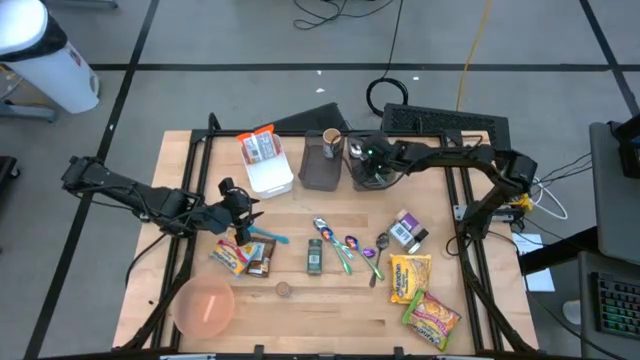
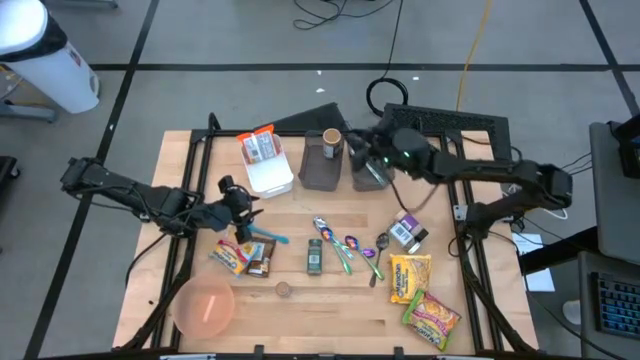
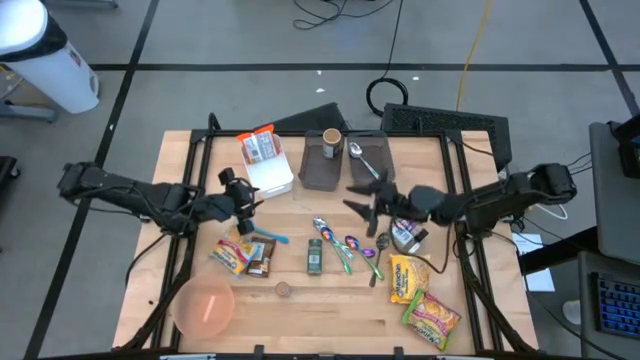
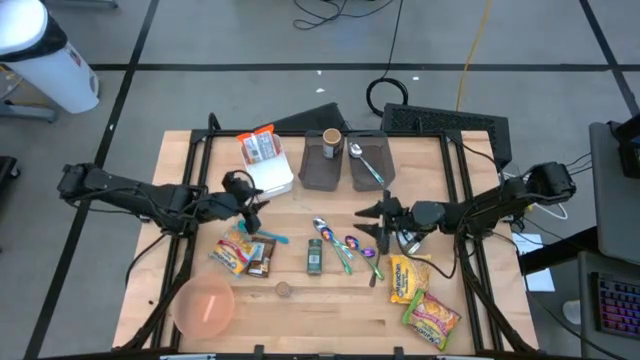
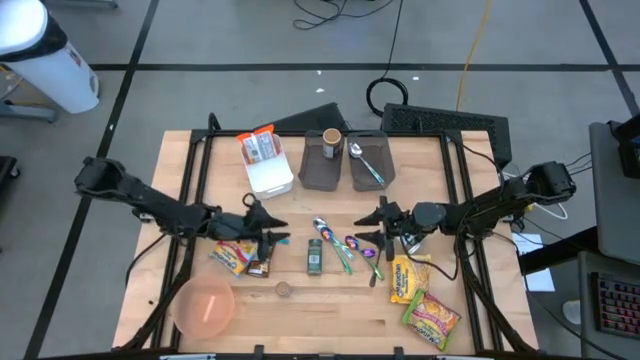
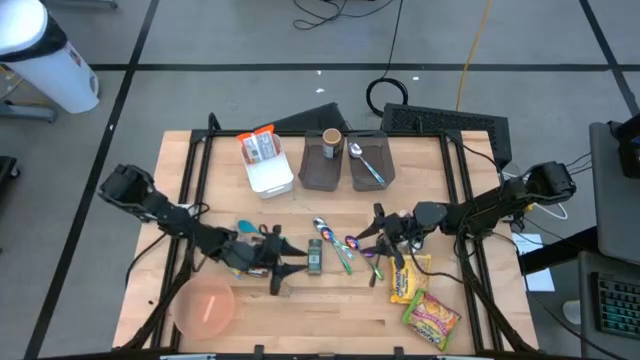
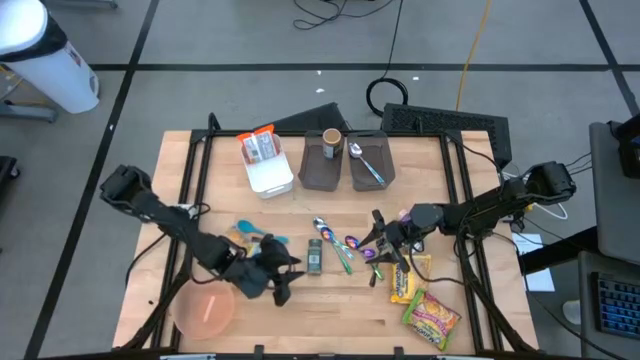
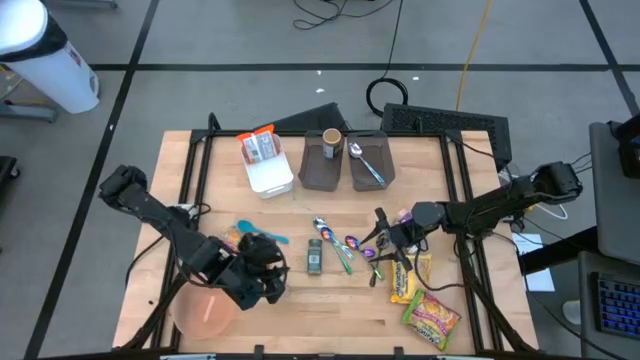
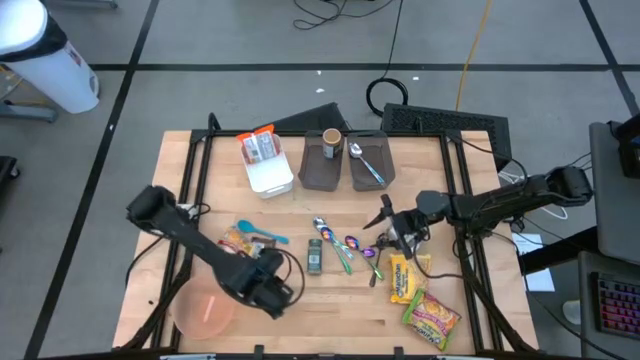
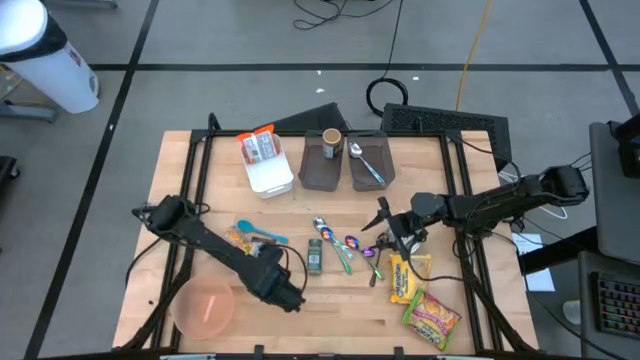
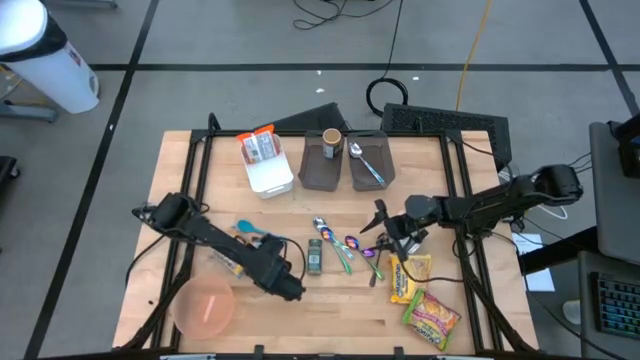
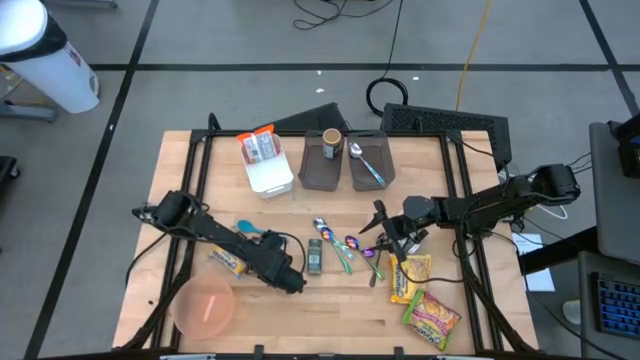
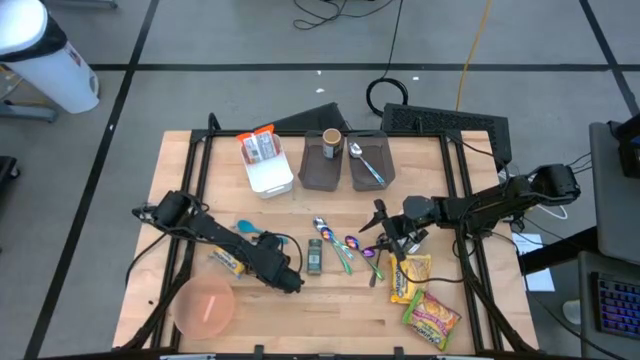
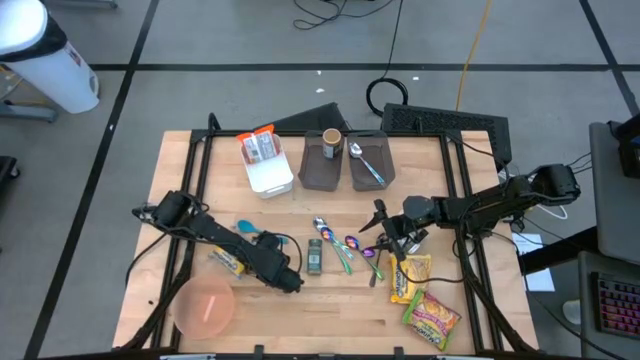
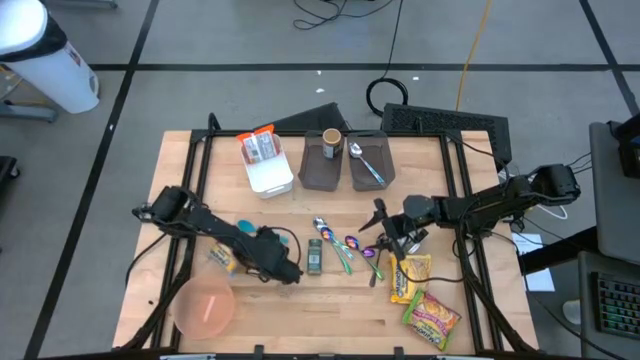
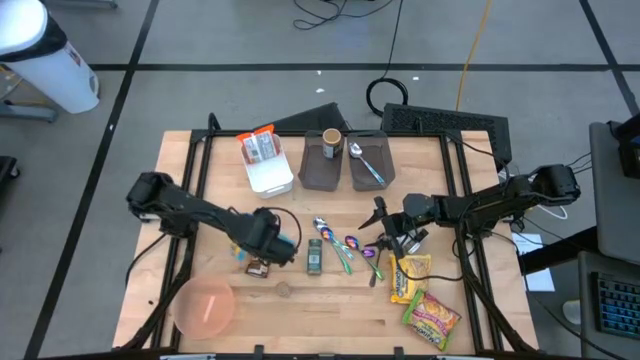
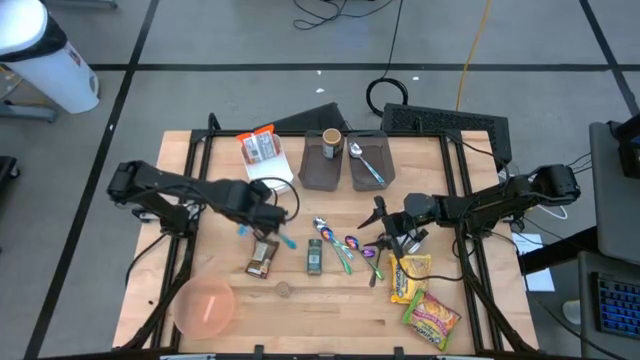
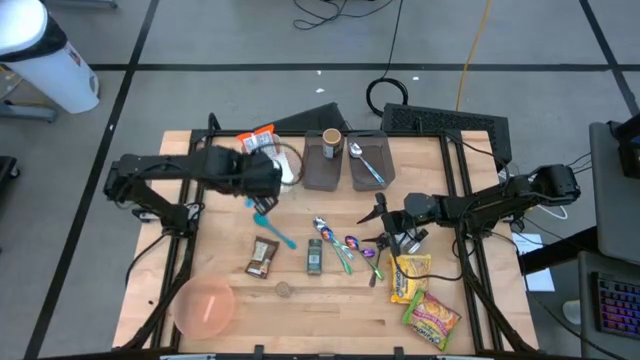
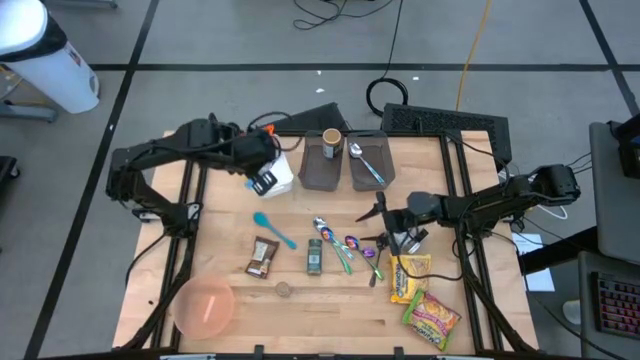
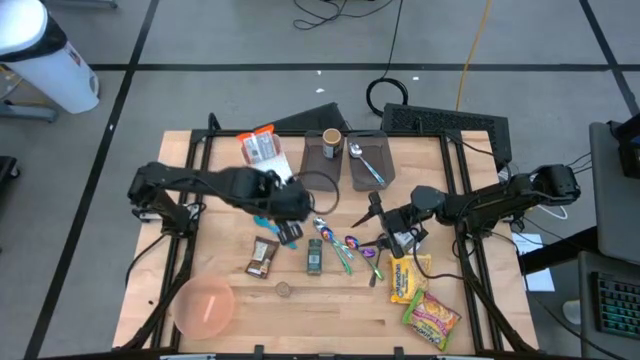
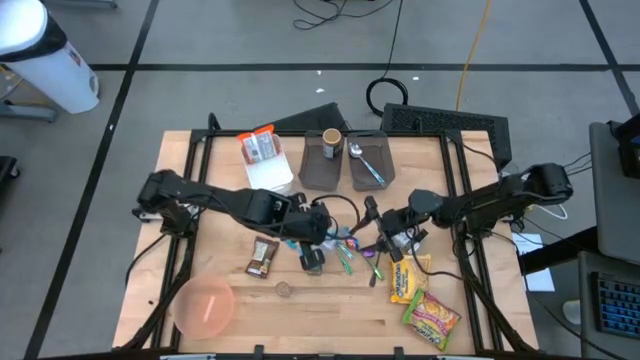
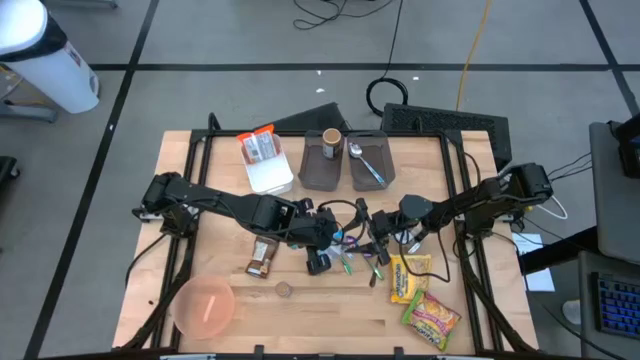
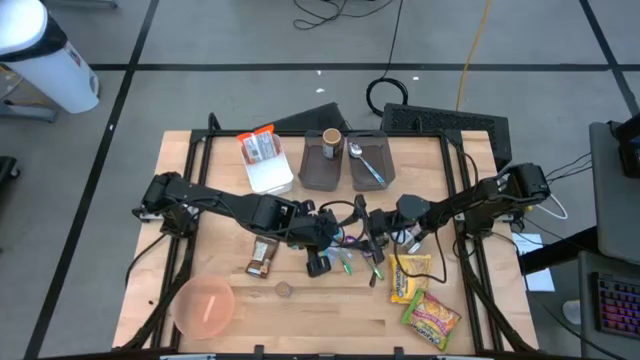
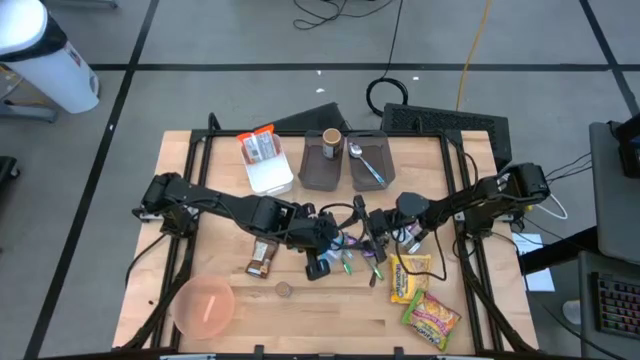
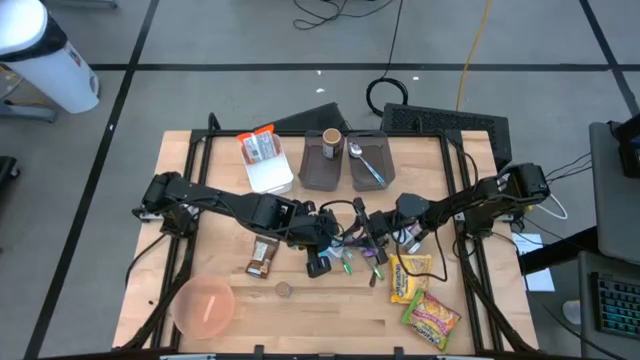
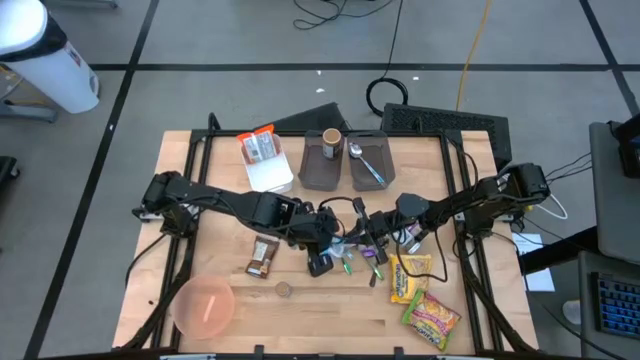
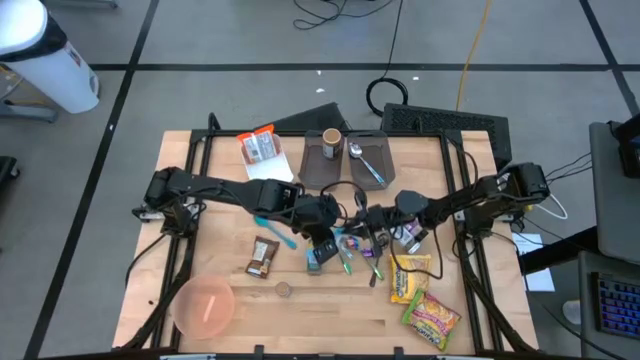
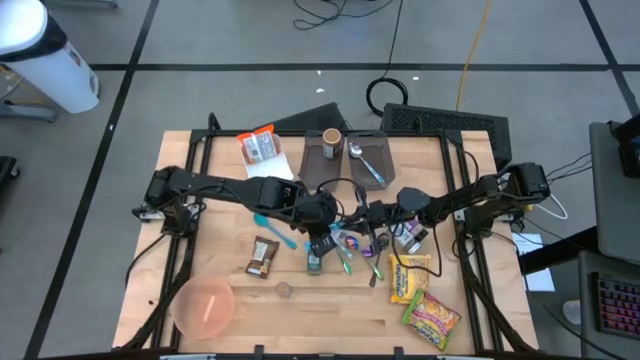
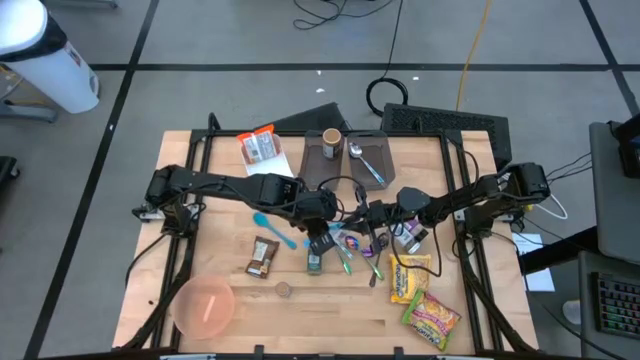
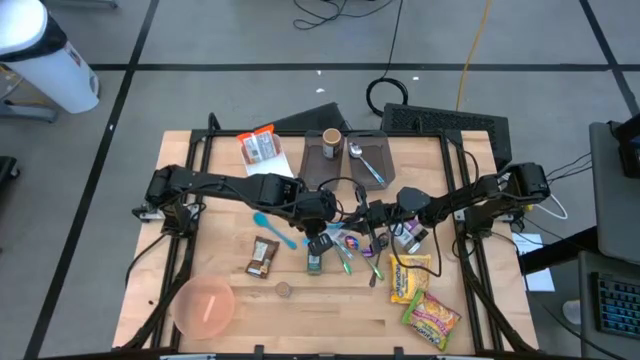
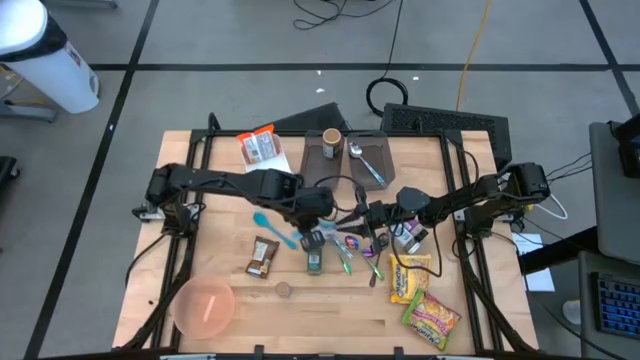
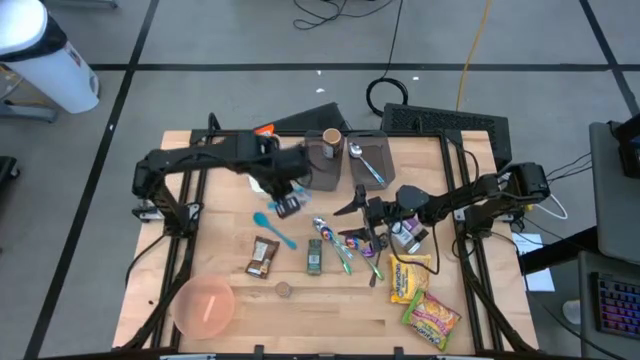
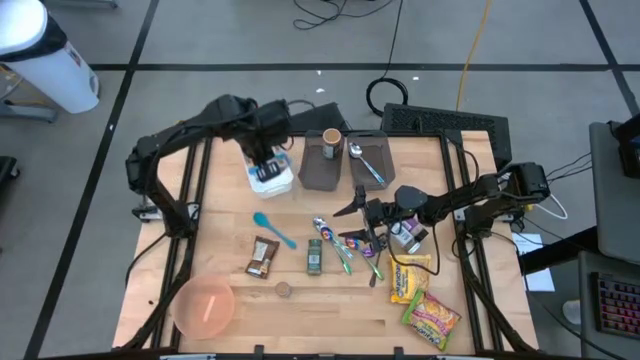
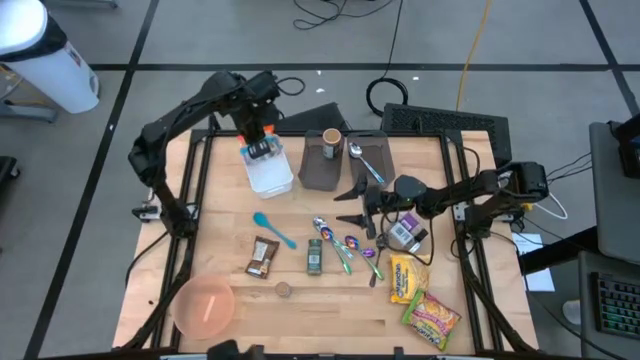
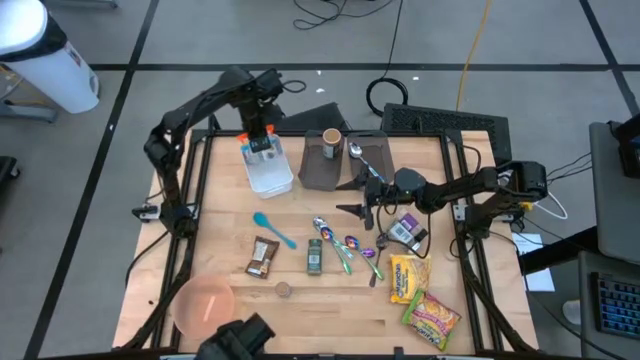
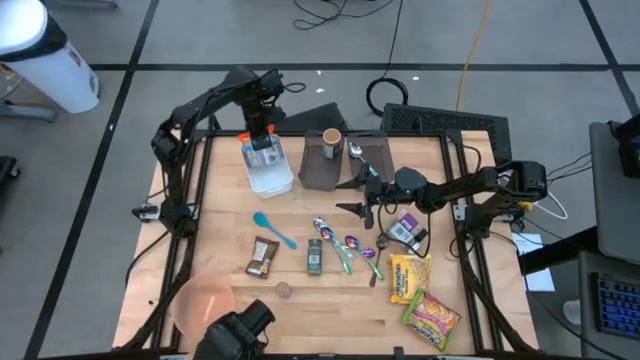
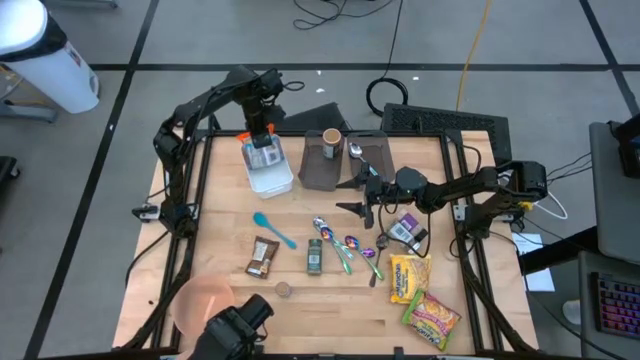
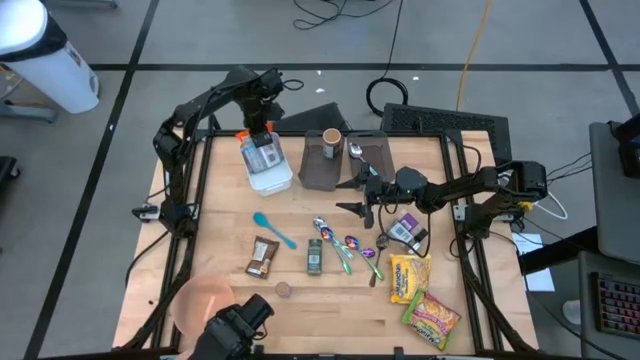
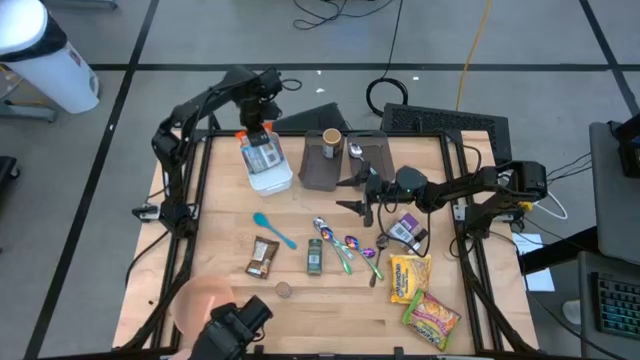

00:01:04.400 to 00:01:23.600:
Task: Pick & Place Food Item
Put the blue noodle pack into the white bin

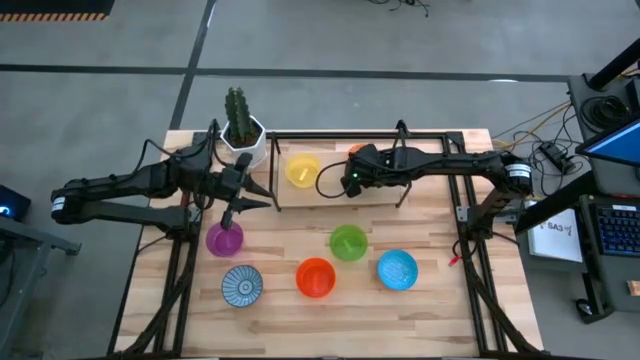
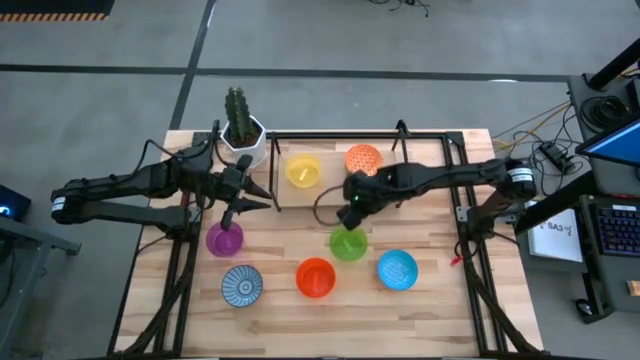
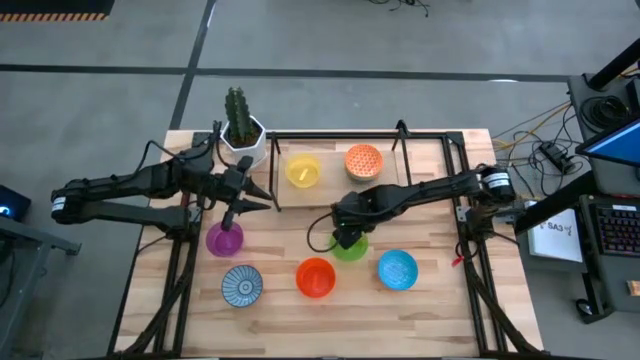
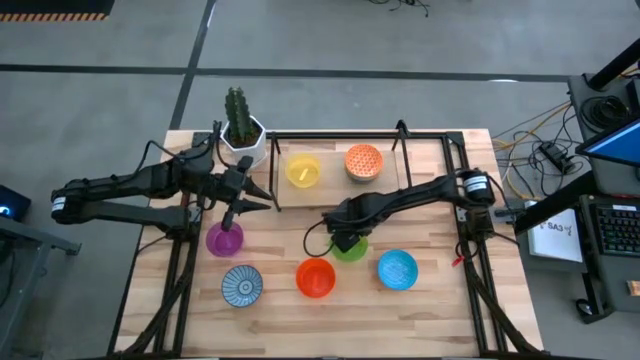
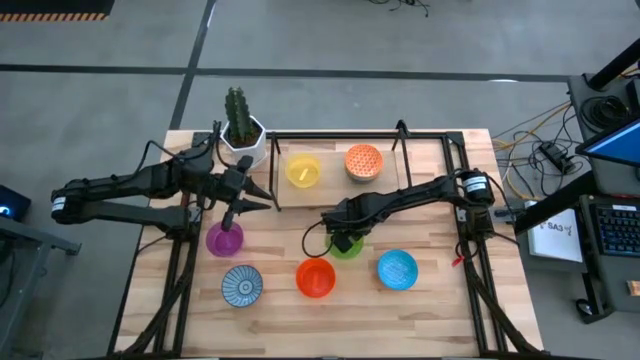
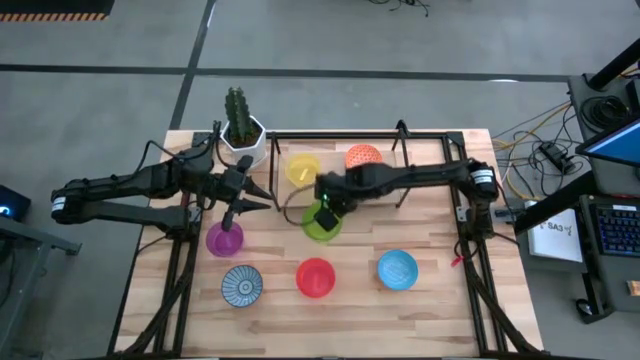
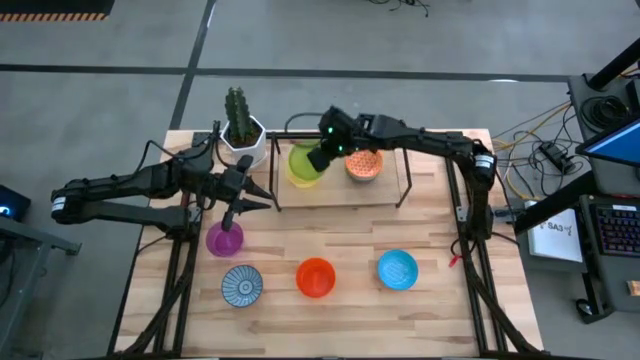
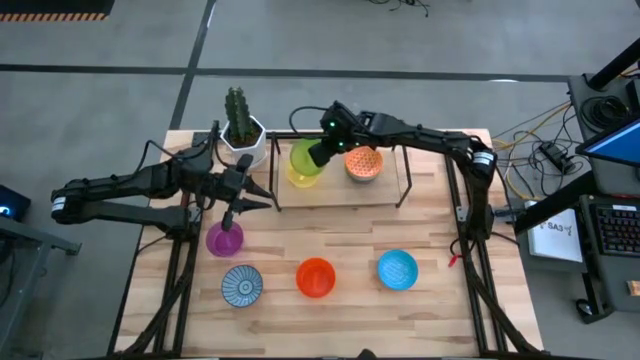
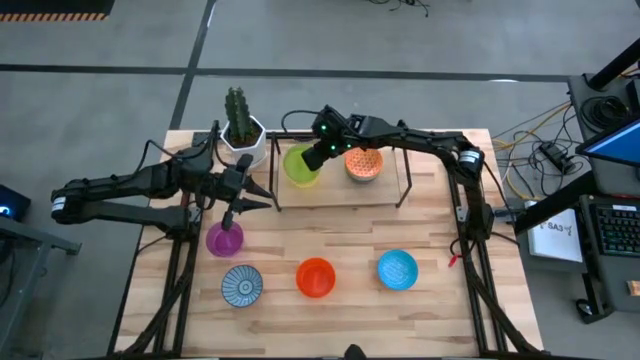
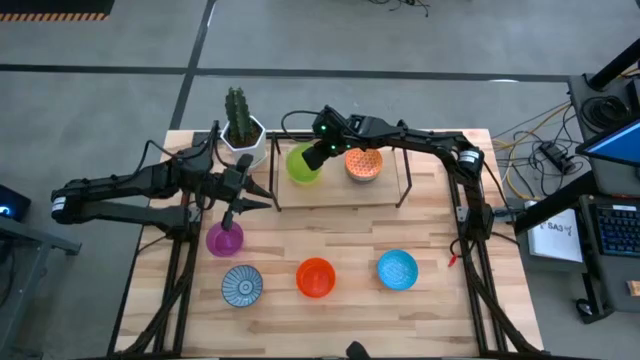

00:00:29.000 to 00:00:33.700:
Task: Place and stack bowls onto a shelf
Stack the green bowl on the yellow bowl
